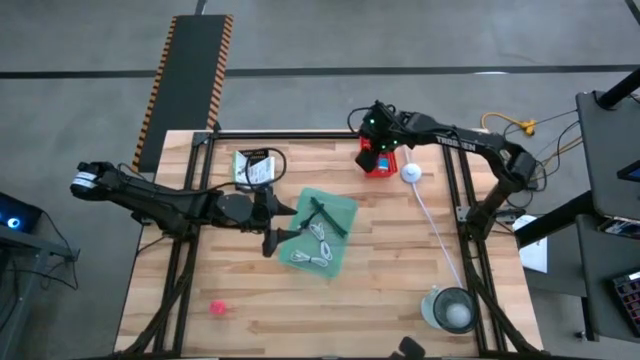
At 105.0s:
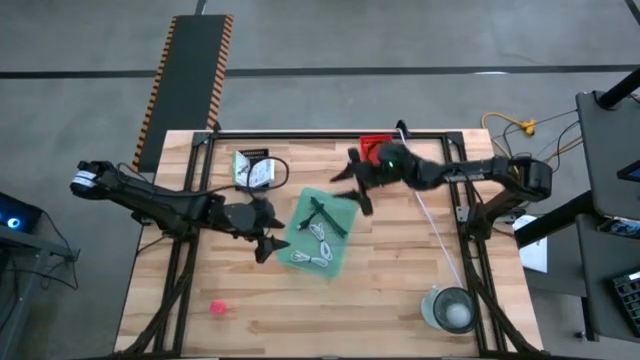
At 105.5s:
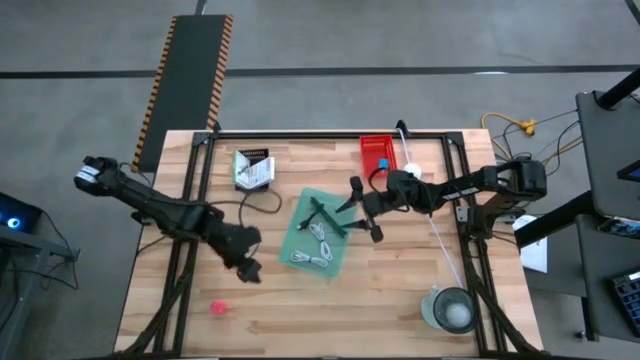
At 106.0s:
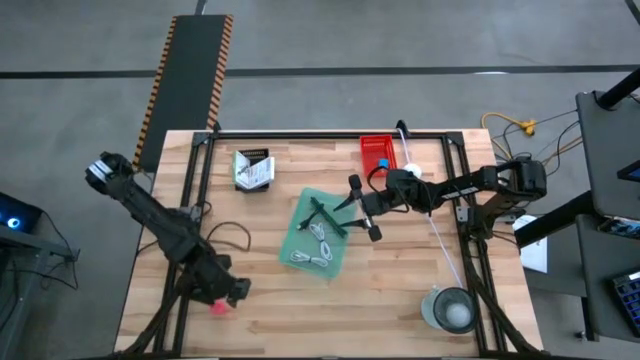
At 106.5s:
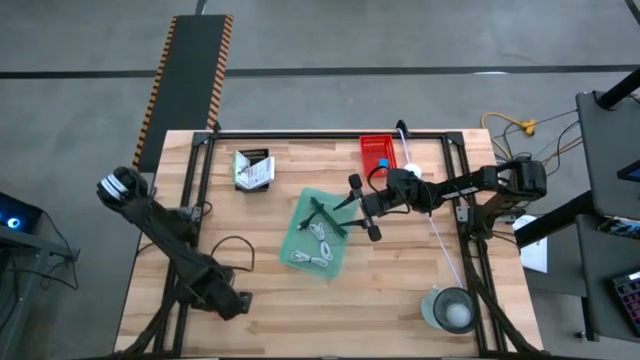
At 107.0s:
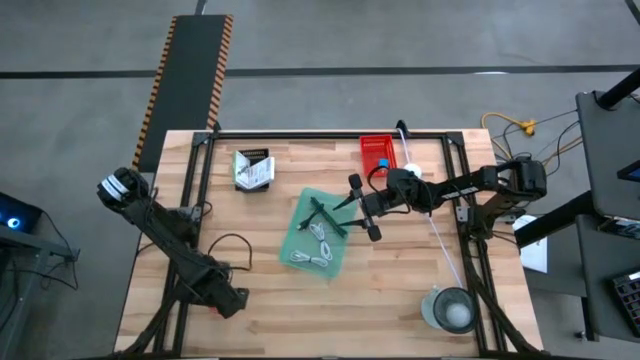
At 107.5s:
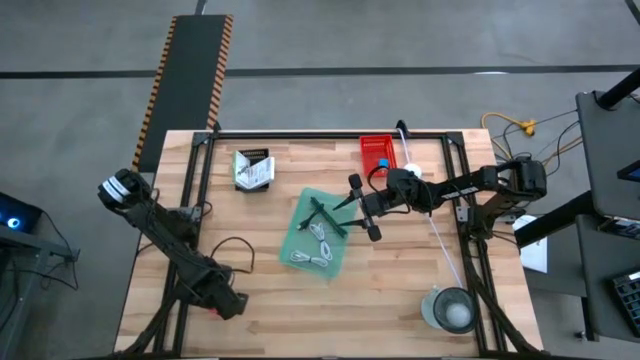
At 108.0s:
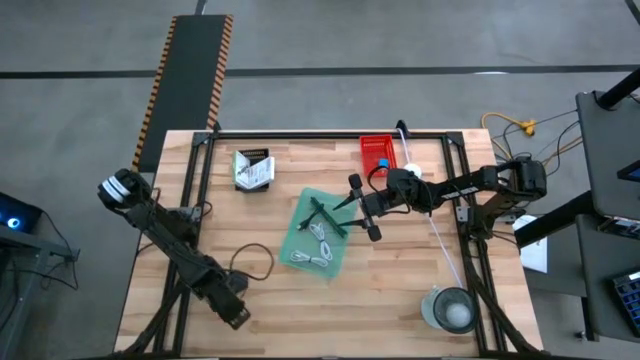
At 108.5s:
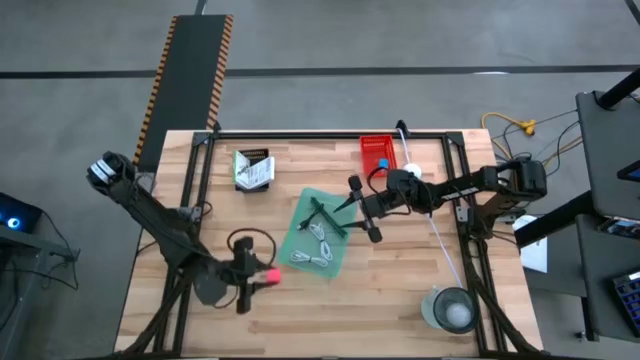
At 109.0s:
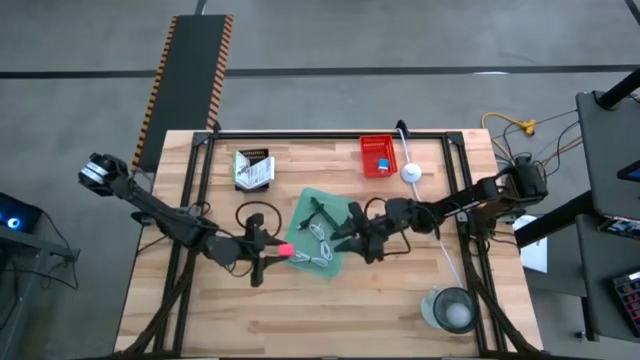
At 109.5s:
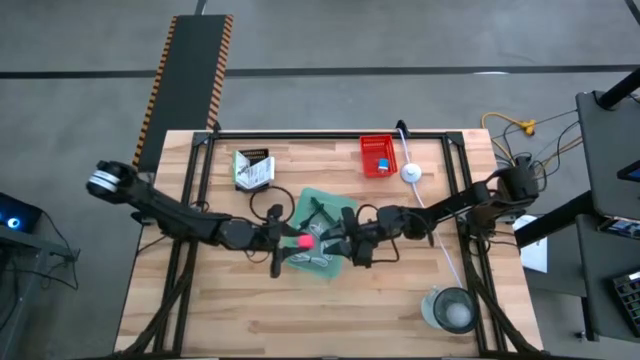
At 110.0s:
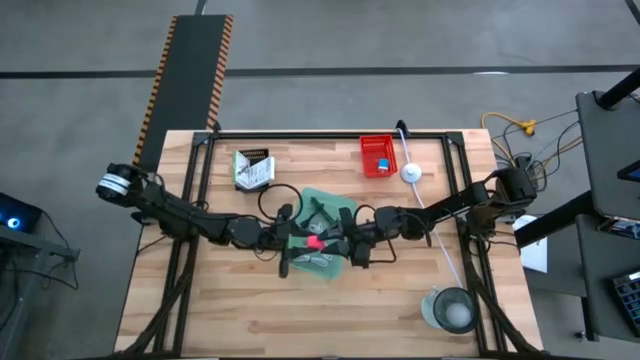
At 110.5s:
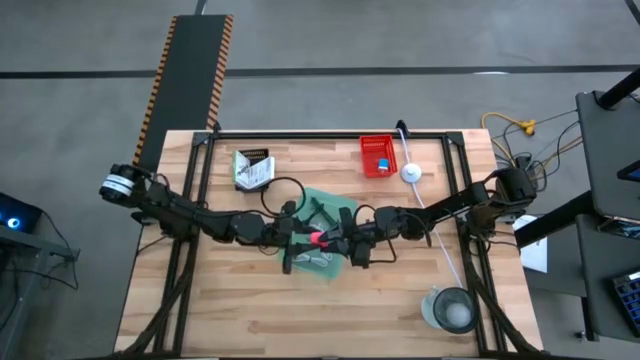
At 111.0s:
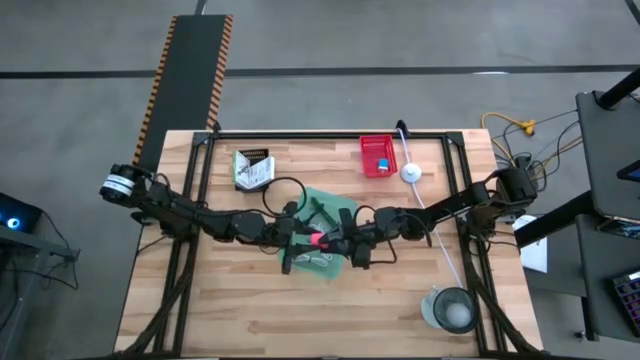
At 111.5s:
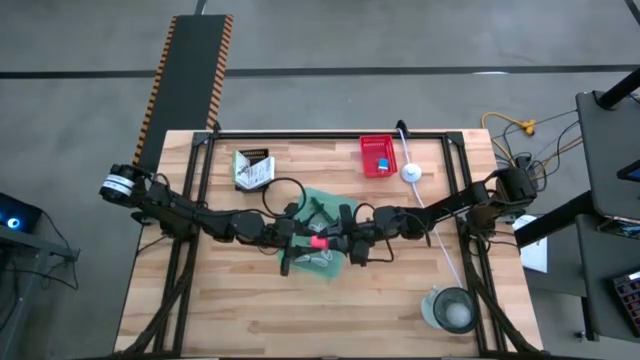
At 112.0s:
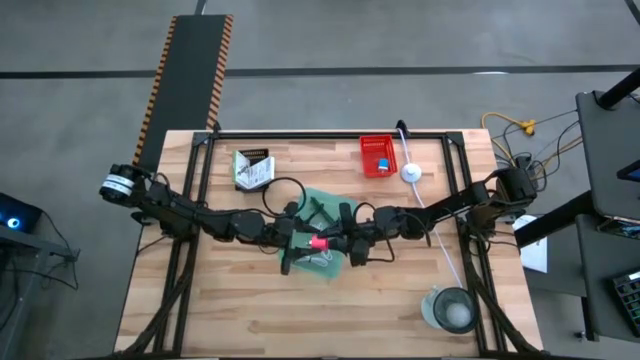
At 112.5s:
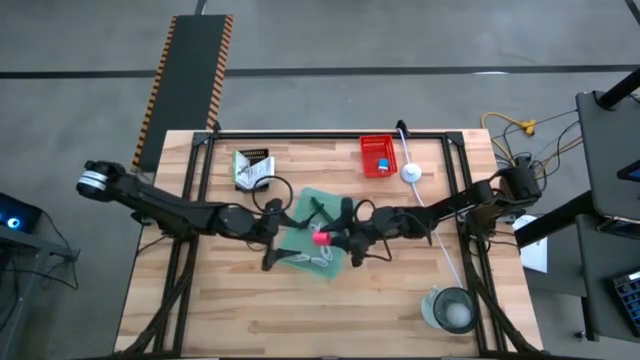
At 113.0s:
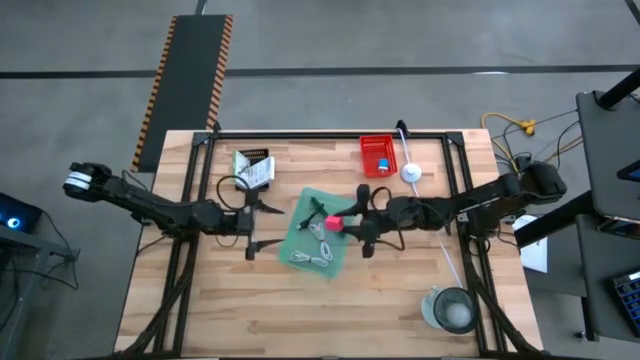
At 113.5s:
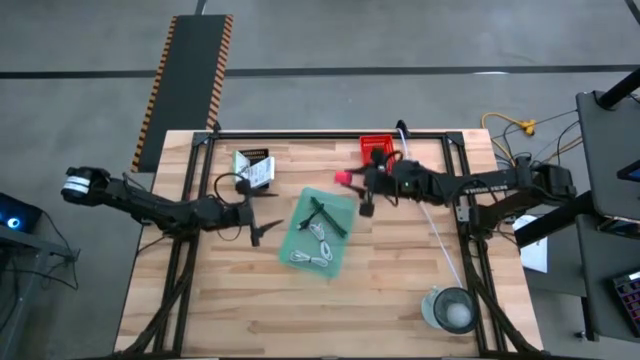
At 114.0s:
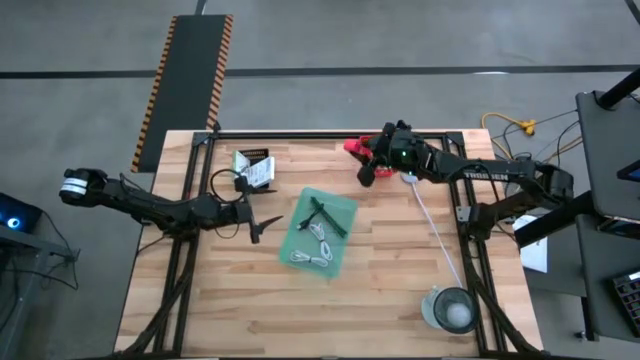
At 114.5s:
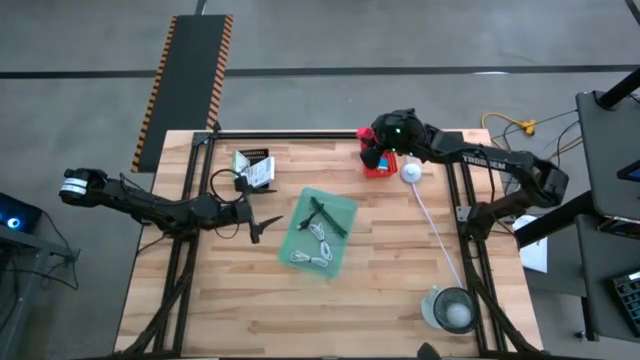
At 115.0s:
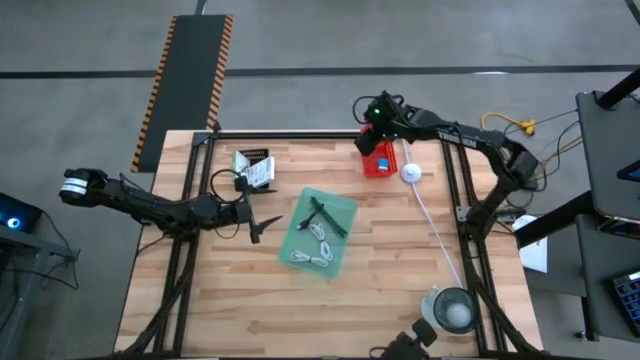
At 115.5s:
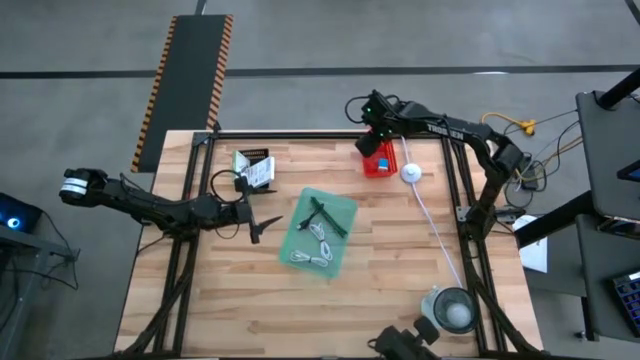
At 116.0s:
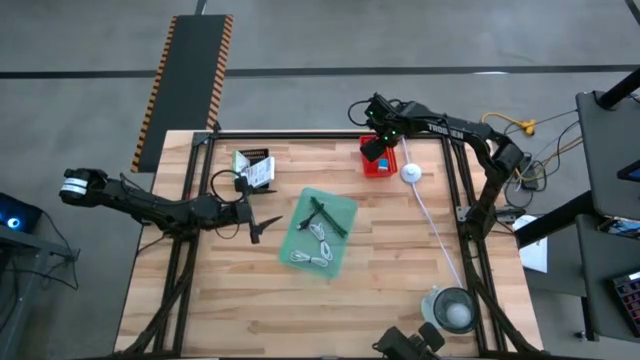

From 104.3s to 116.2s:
Task: Pick and place items into bin
Put the pink charger adapter into the red basket

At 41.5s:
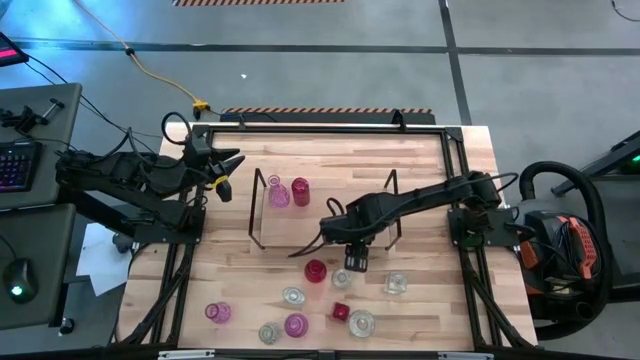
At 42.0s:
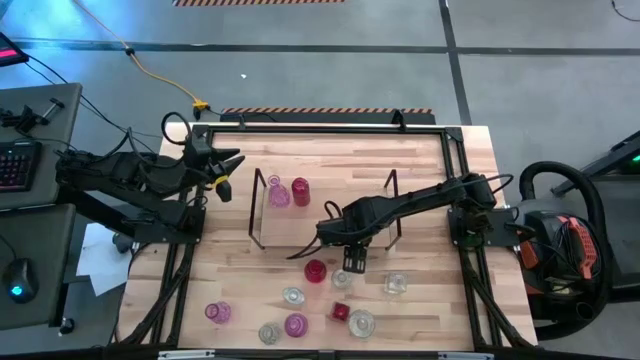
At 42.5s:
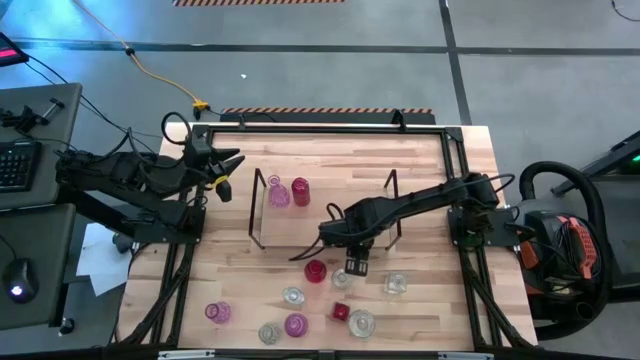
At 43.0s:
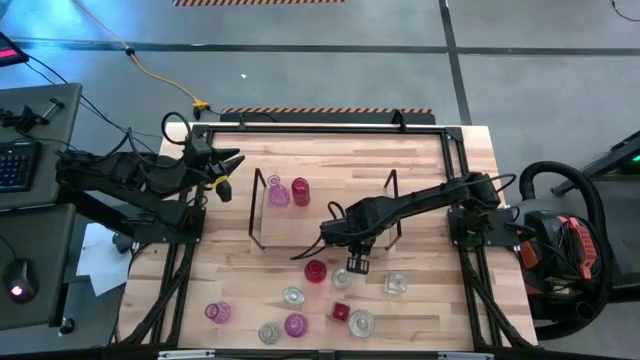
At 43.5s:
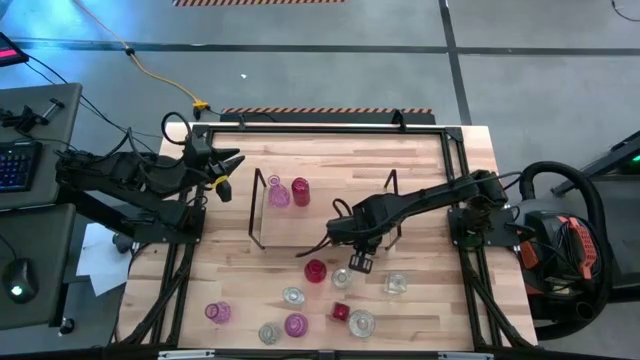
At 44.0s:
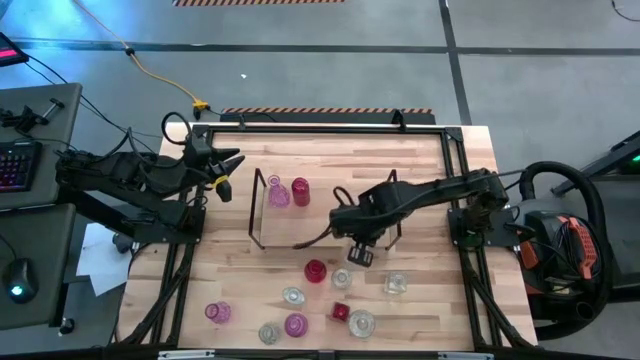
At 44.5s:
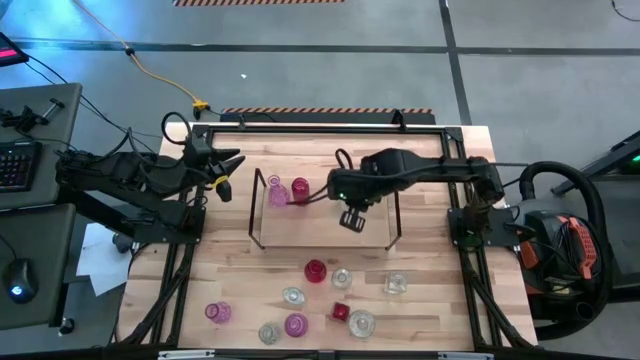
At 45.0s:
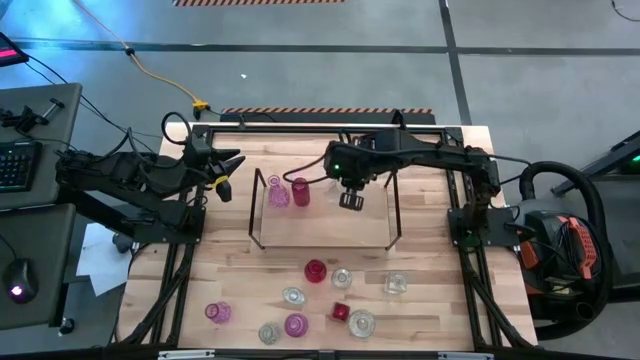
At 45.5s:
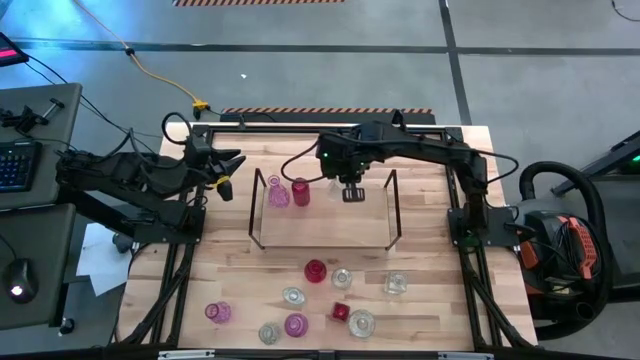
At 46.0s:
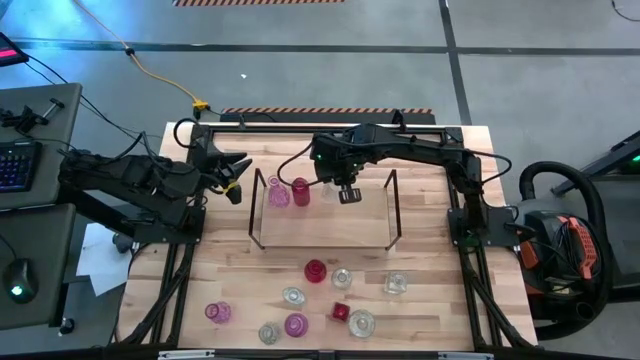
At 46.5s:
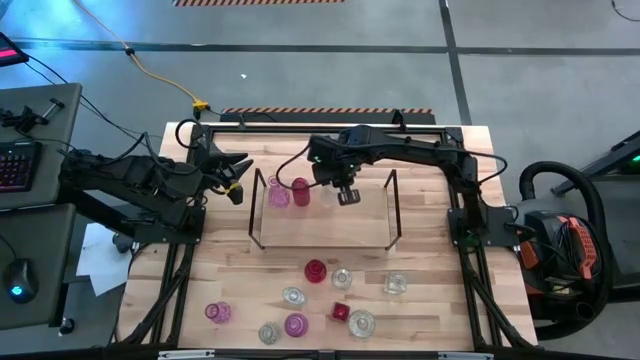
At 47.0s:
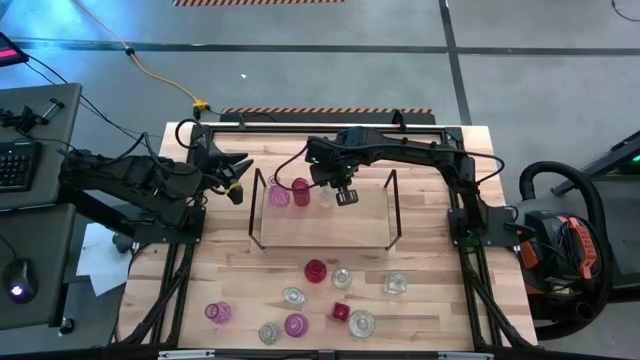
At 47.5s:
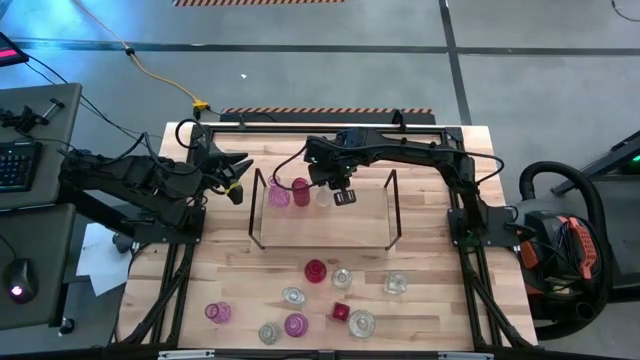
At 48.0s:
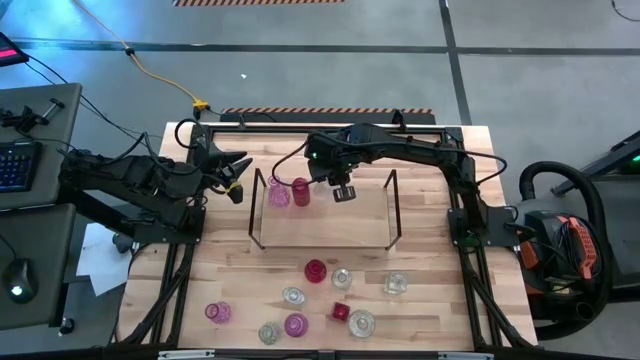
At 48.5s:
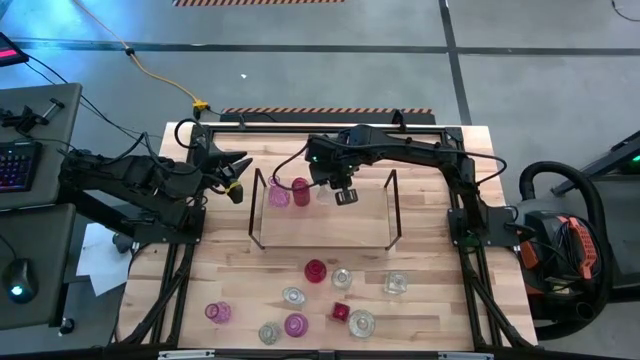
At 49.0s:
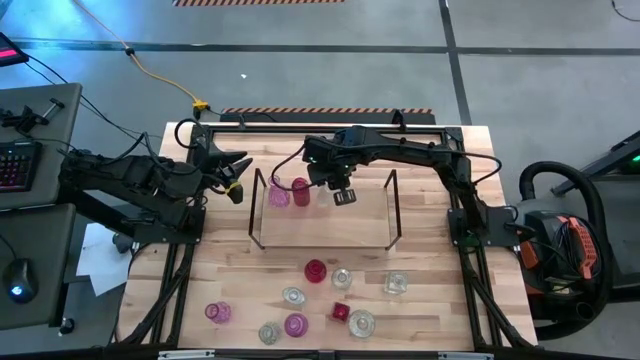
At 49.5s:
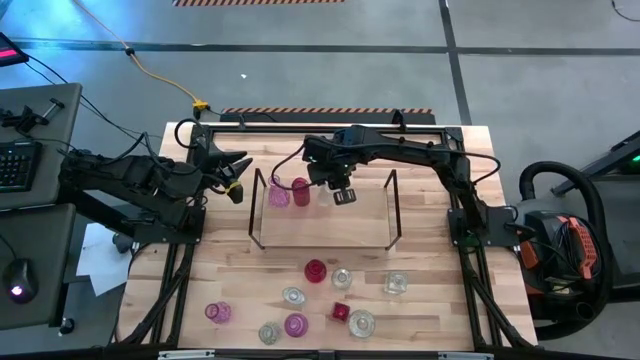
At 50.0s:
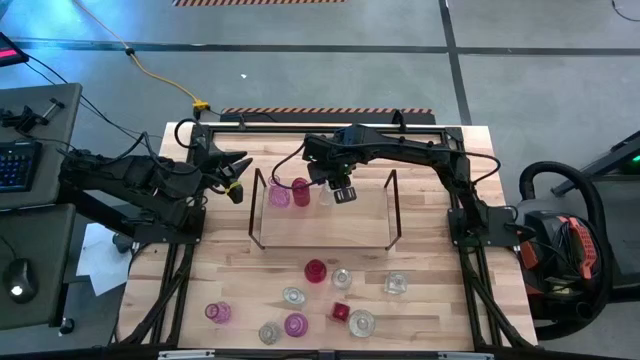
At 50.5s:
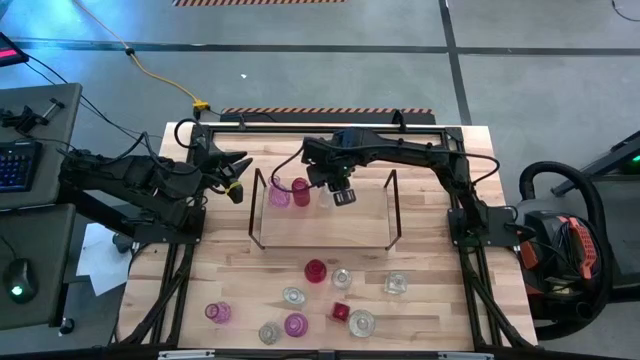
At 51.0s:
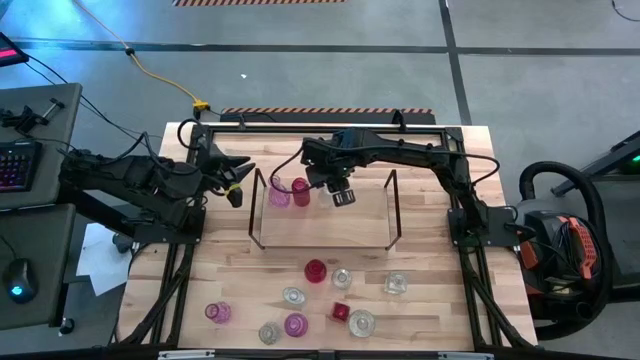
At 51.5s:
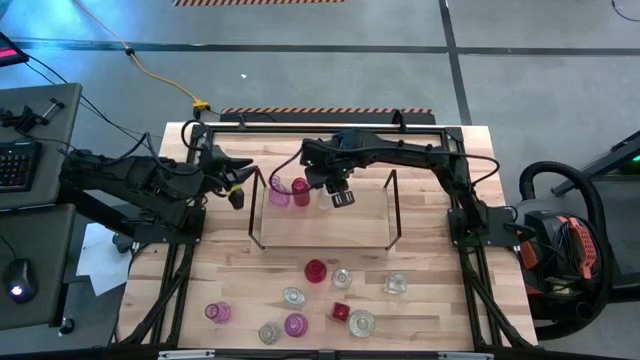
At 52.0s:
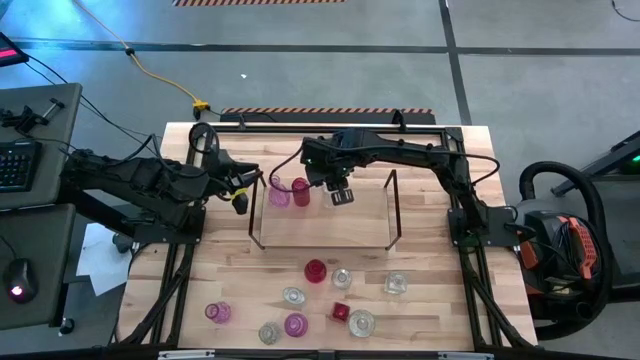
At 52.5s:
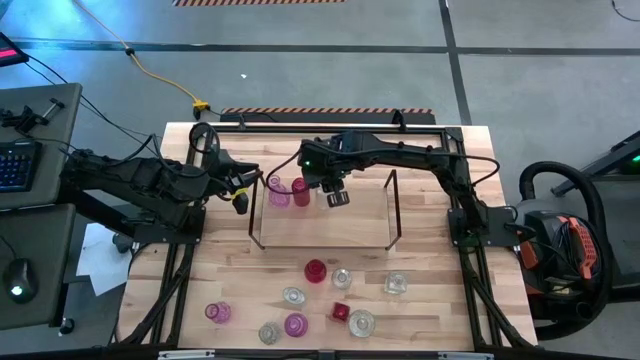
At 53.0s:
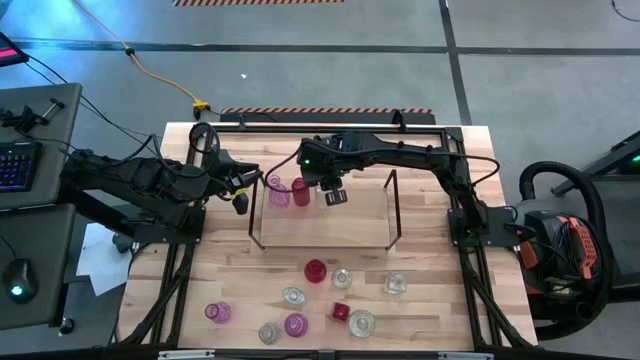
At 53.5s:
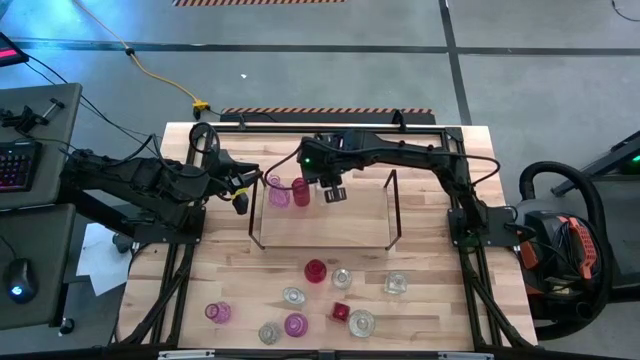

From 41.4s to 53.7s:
Task: sort vases onto shelf
Put the transparent vase on the shelf
